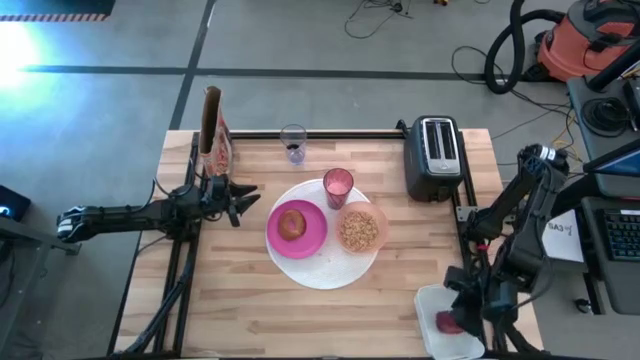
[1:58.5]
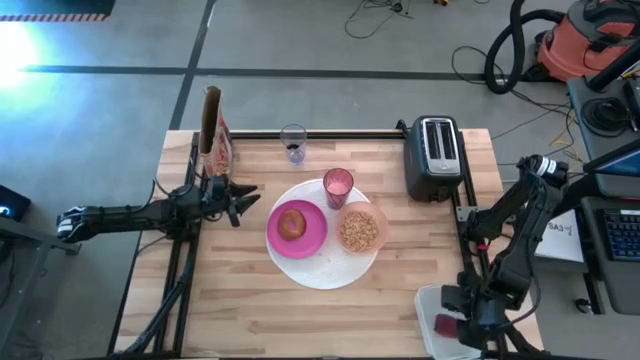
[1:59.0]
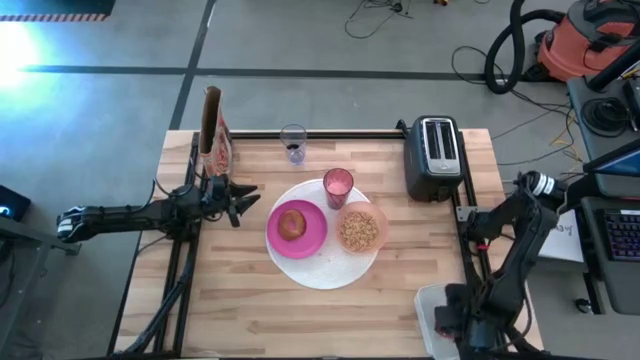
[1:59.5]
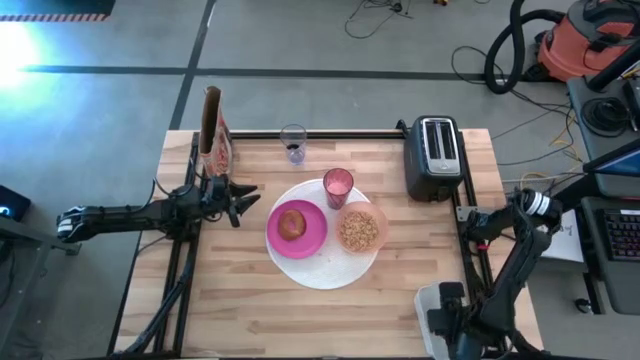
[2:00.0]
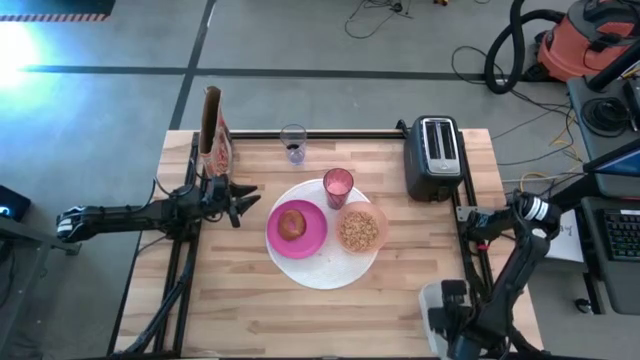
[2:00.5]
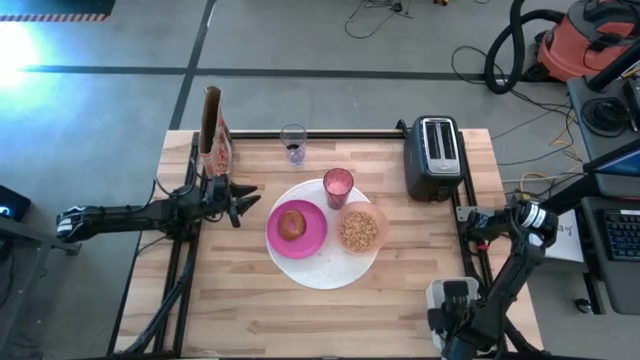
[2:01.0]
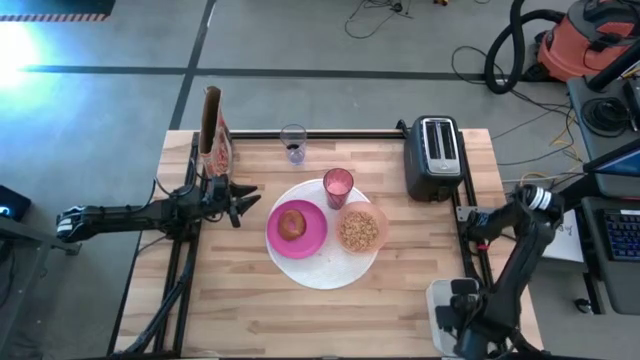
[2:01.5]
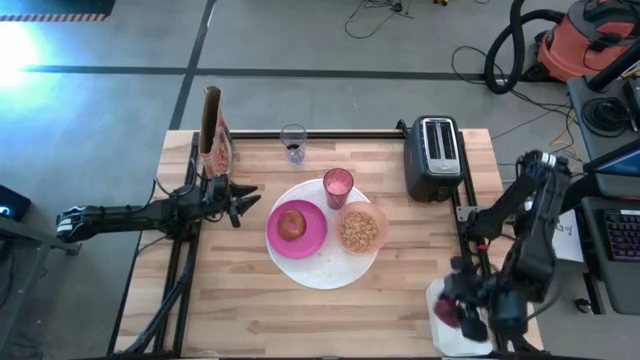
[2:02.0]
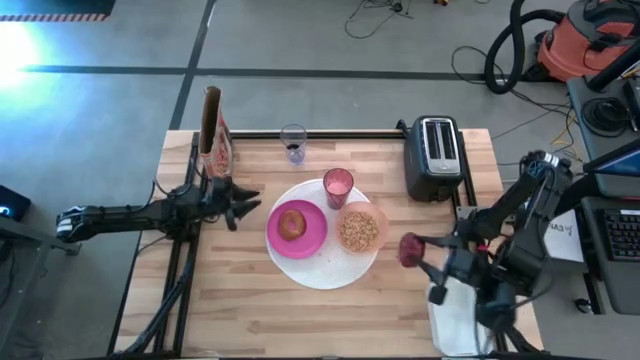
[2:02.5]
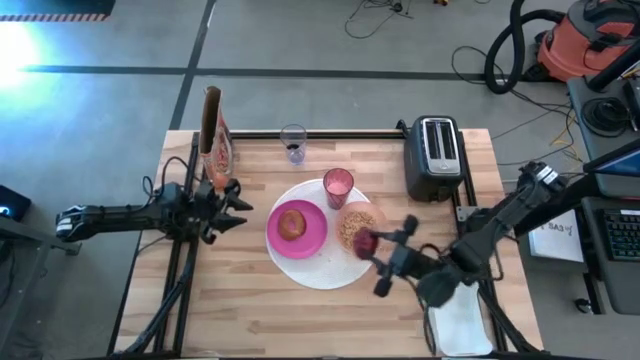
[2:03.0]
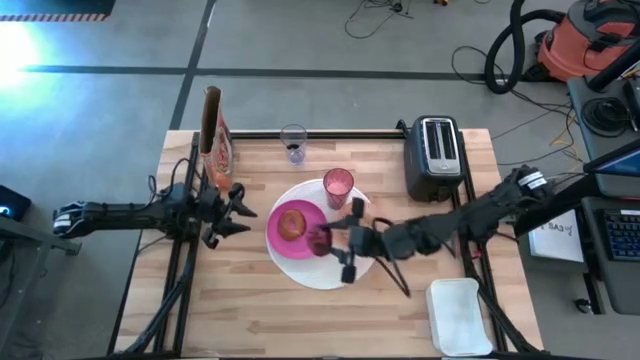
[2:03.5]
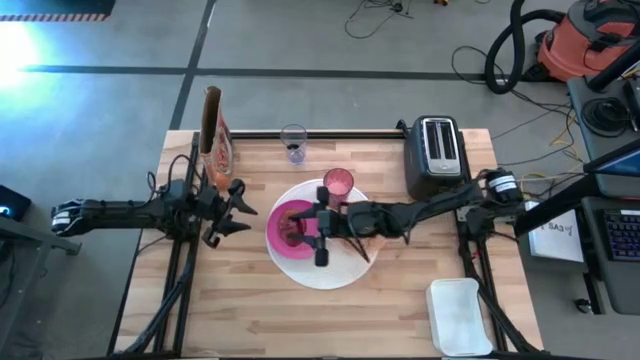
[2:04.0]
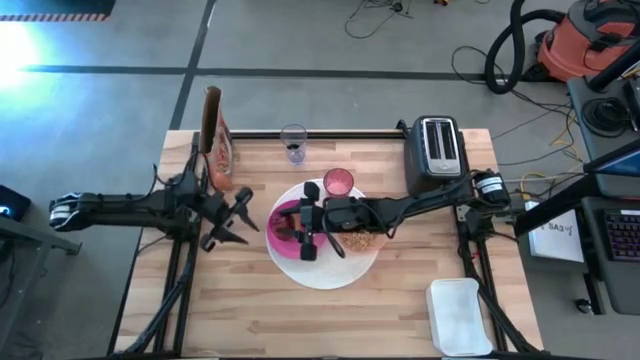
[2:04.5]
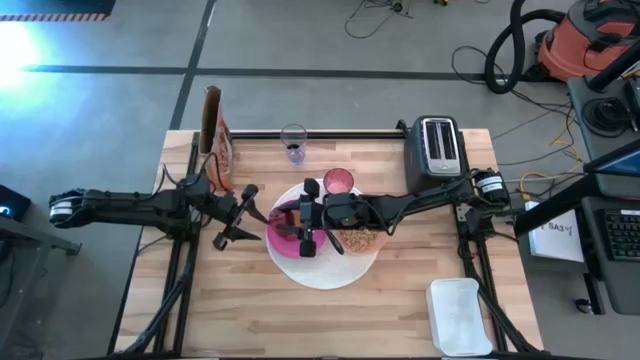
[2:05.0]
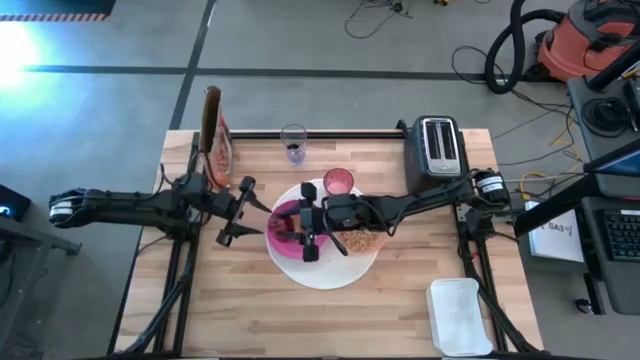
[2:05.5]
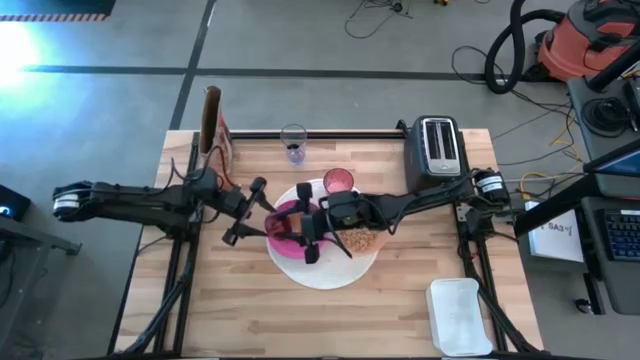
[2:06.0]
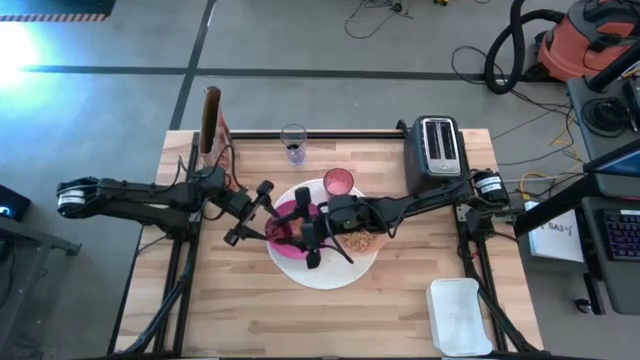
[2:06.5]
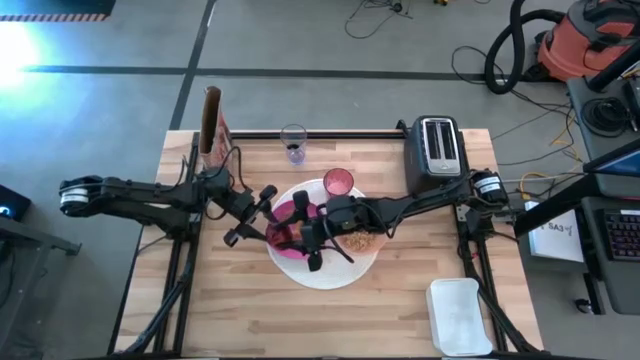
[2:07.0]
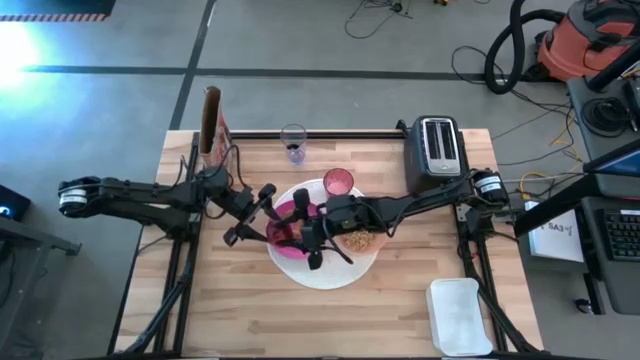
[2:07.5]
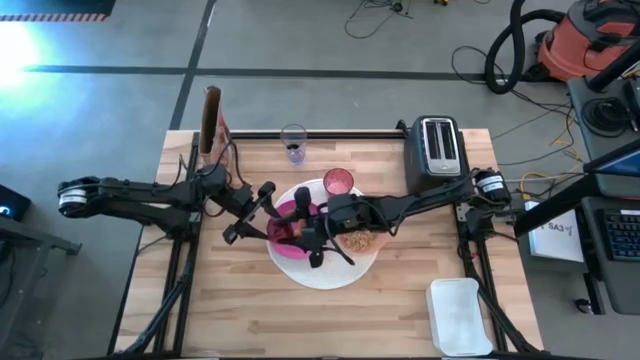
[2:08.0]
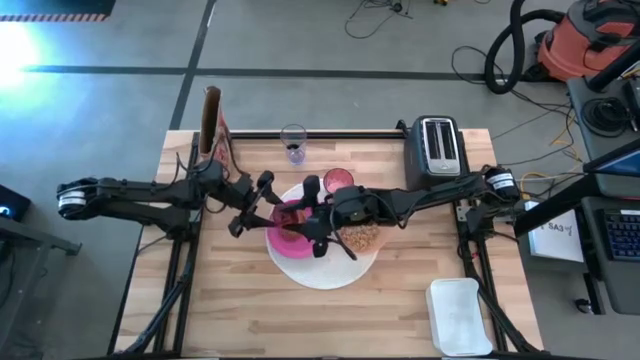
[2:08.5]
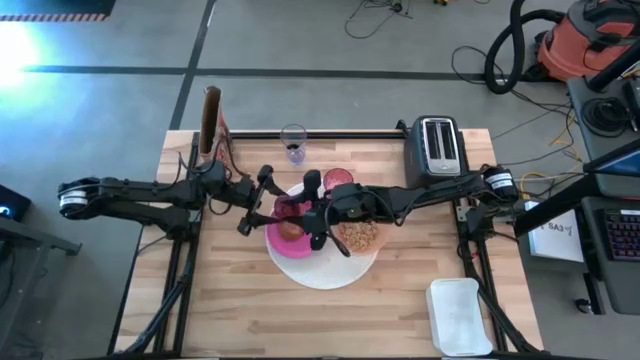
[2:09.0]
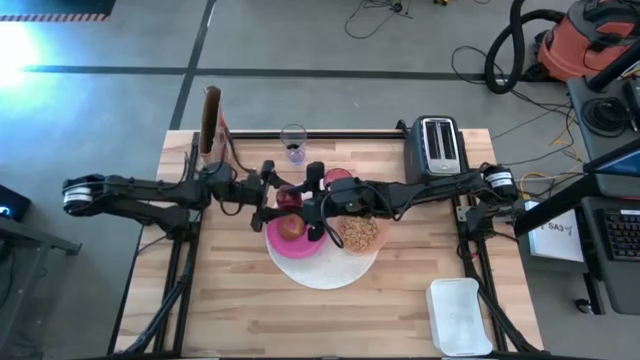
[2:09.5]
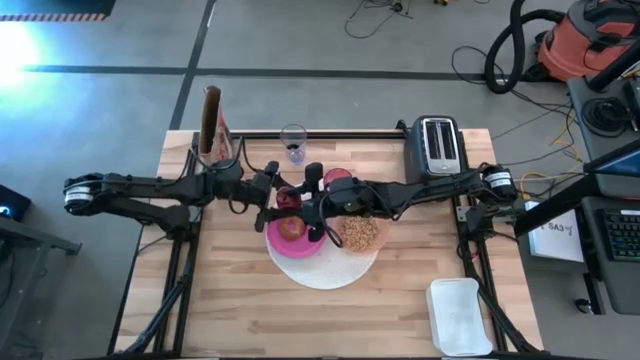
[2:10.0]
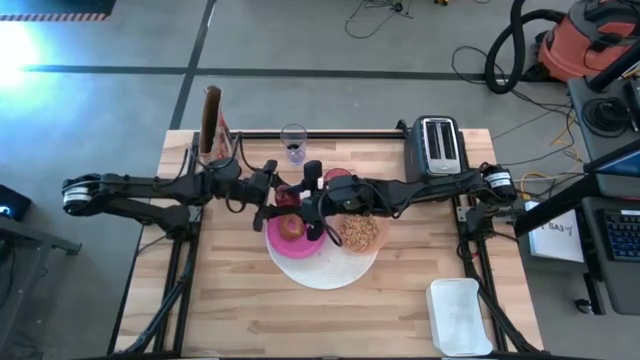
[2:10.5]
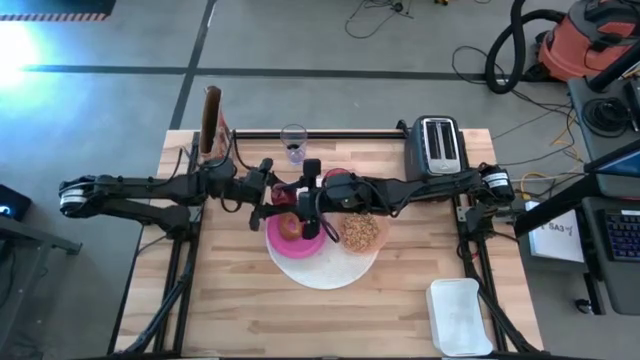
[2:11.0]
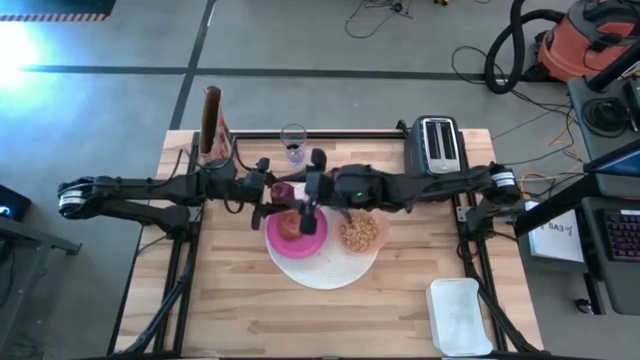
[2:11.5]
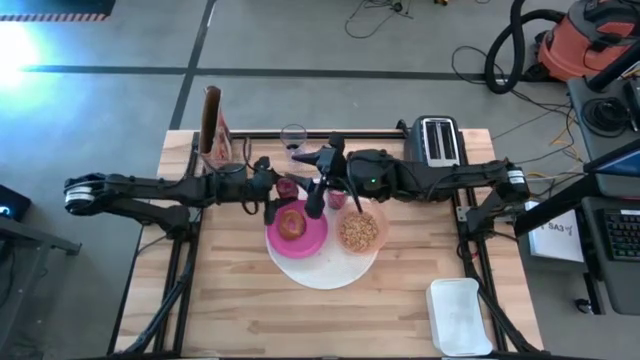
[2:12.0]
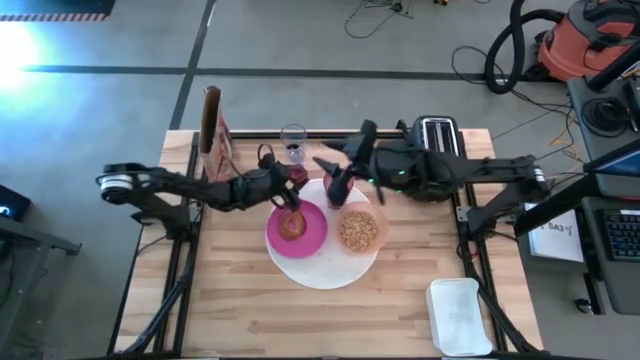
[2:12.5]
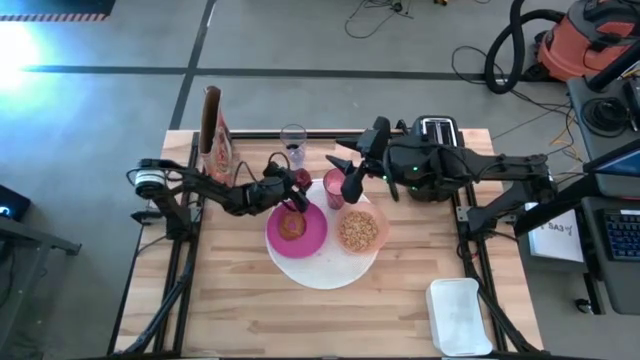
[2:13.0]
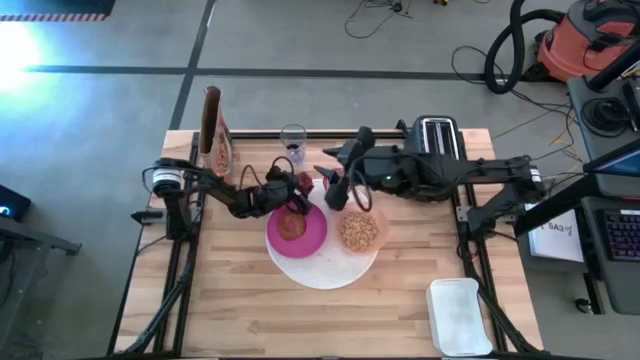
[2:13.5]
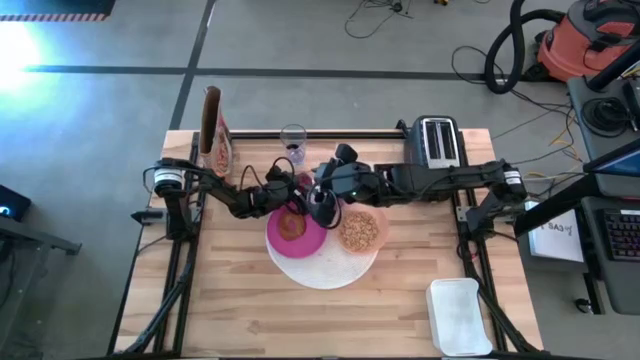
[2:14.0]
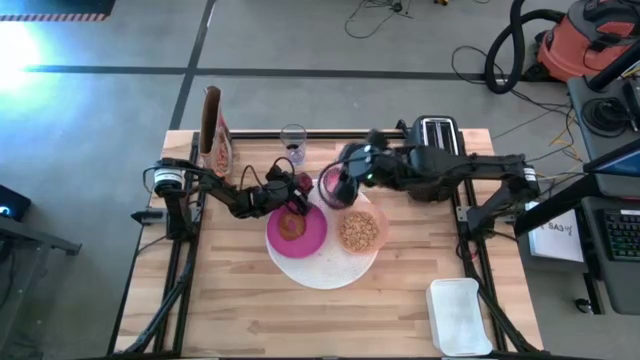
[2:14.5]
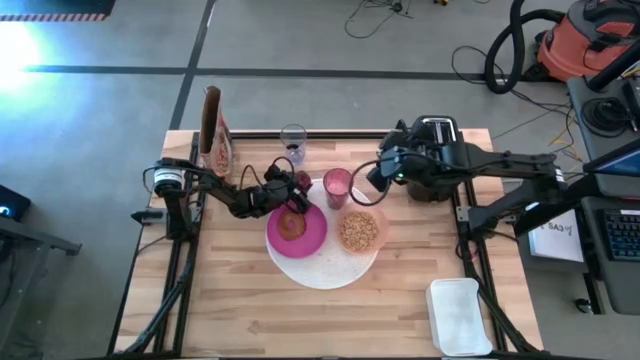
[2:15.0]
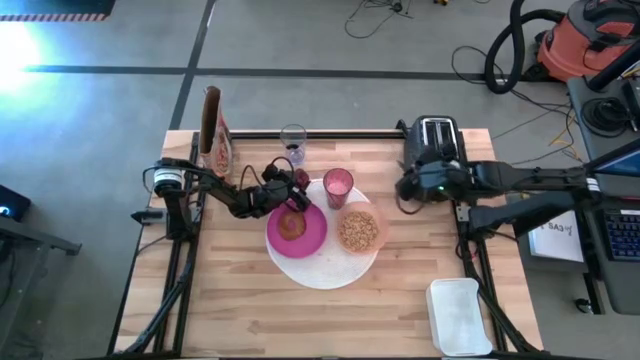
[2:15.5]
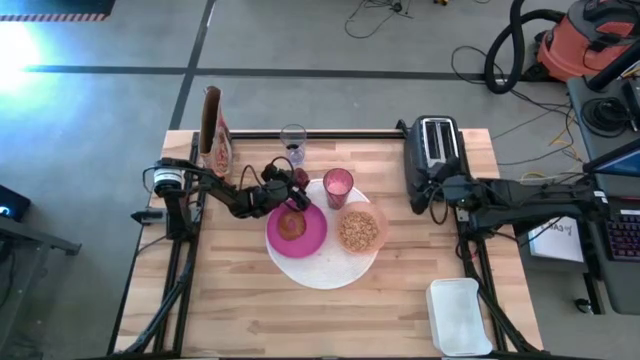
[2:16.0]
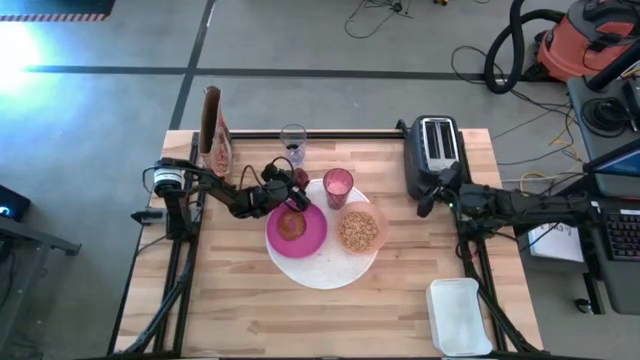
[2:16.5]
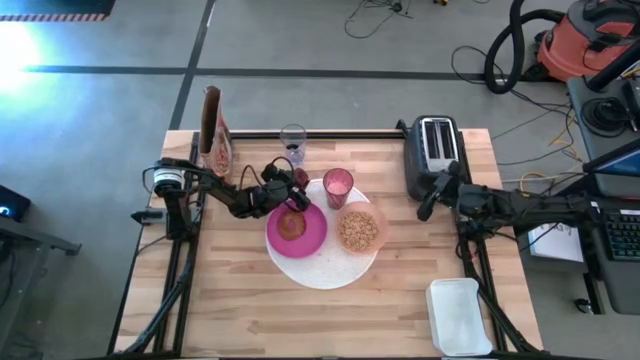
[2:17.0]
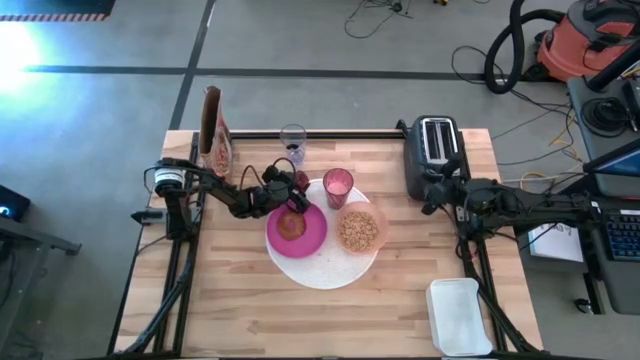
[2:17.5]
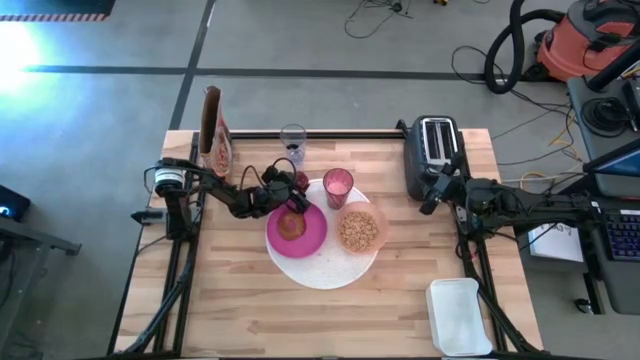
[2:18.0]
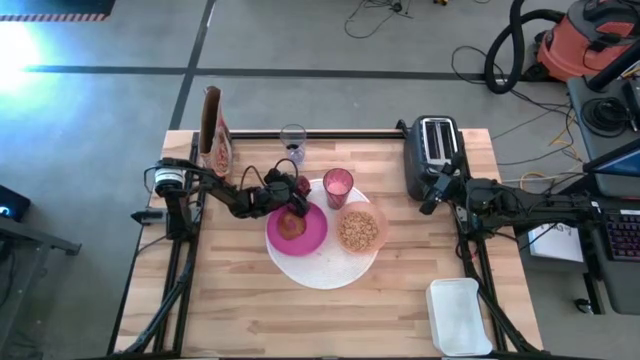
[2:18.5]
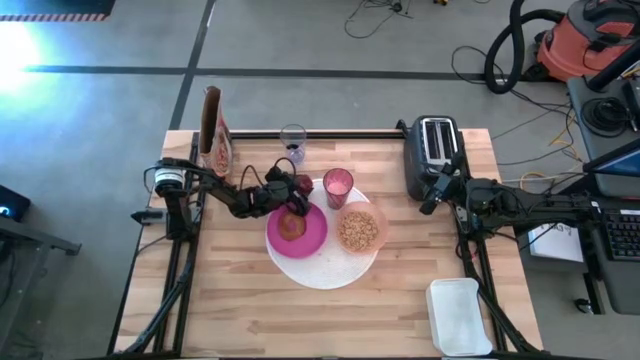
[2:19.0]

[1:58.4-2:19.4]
Task: Arrange a breakfast setting
Put the apple to the top of the pink plate

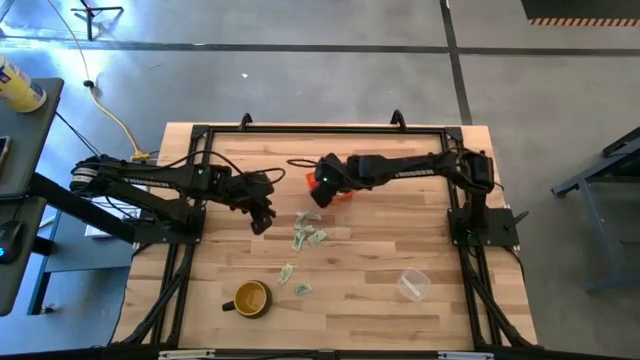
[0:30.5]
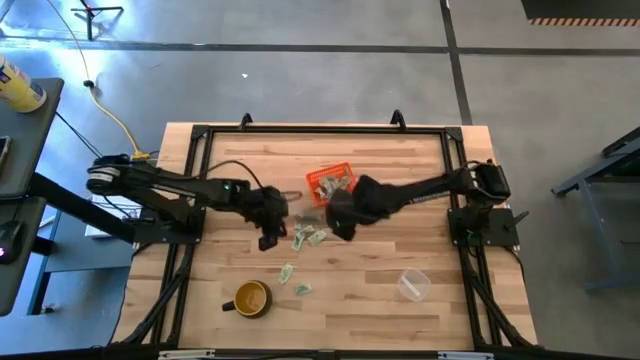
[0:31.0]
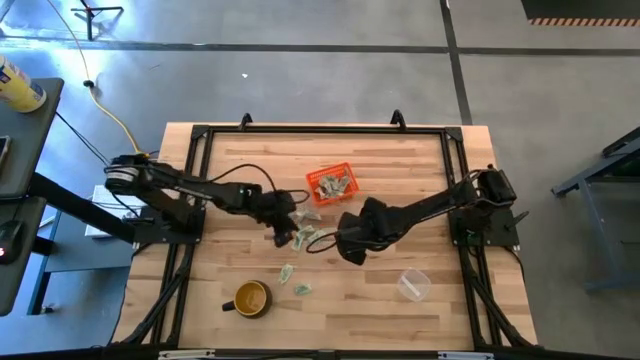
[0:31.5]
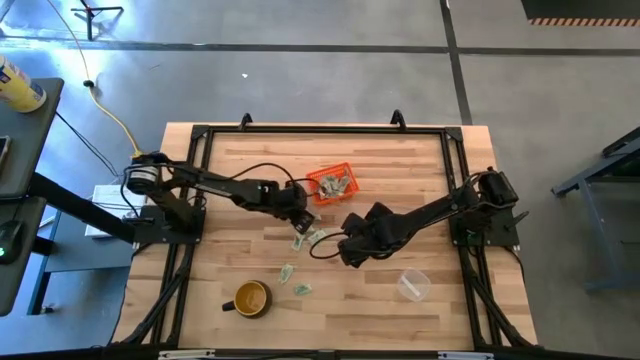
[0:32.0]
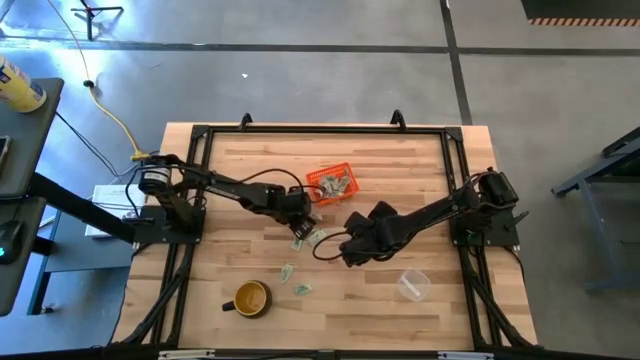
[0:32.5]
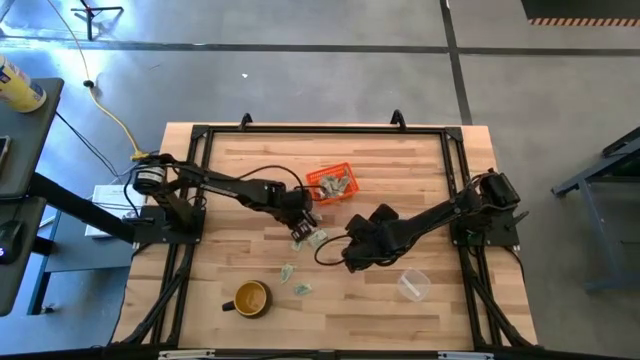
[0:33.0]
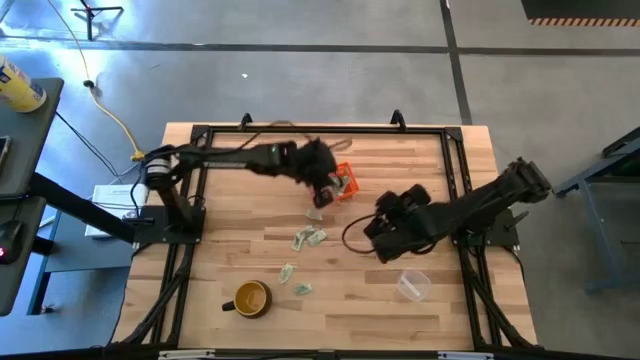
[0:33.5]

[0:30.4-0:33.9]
Task: Pick and place items into bin
Put the white stevia packet into the orange bin
